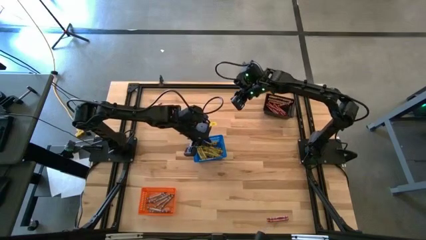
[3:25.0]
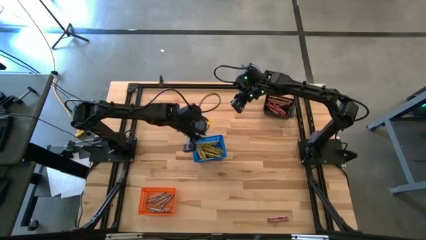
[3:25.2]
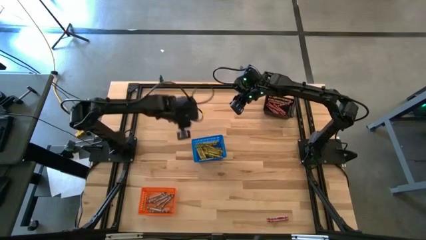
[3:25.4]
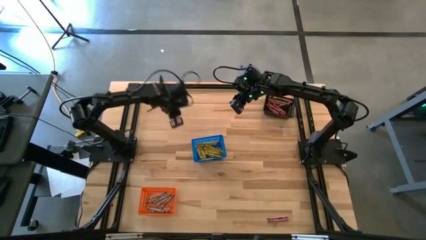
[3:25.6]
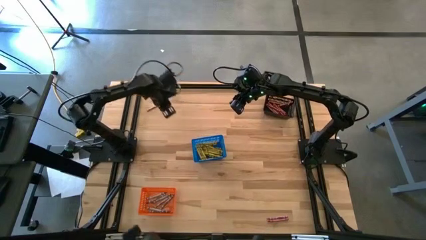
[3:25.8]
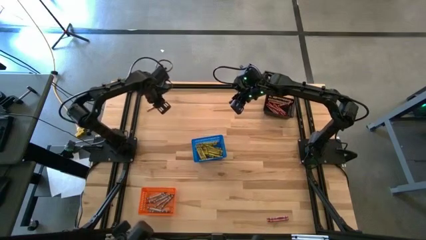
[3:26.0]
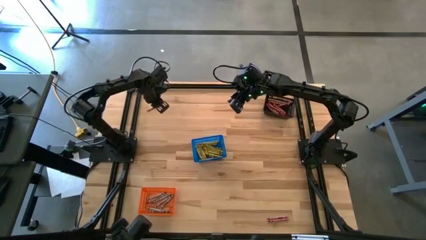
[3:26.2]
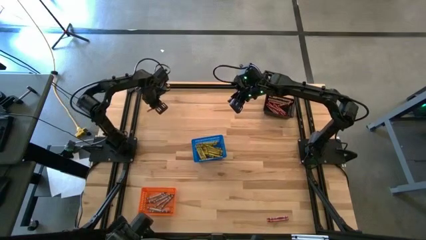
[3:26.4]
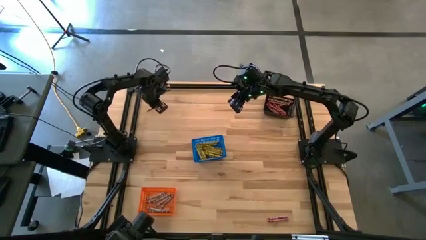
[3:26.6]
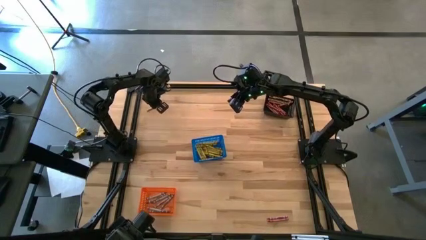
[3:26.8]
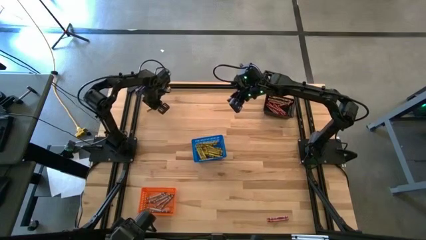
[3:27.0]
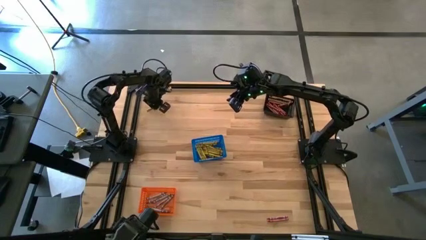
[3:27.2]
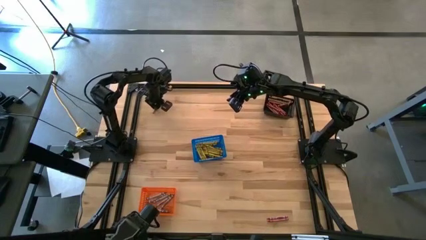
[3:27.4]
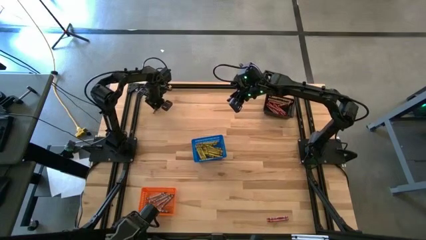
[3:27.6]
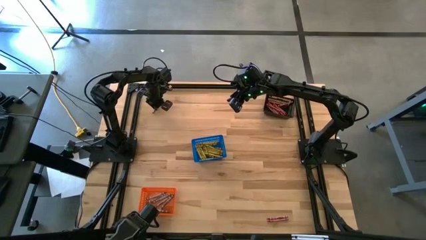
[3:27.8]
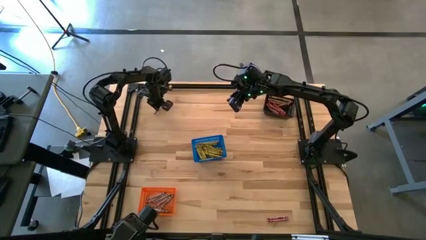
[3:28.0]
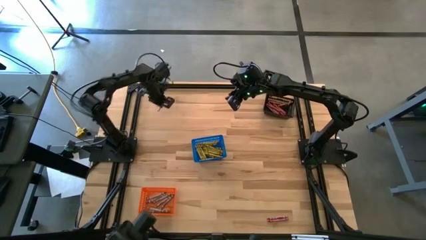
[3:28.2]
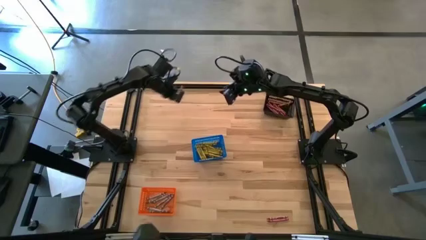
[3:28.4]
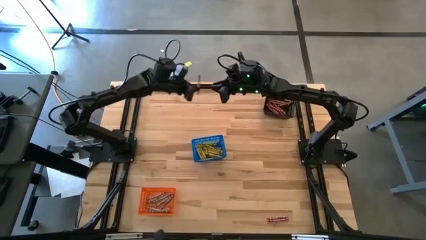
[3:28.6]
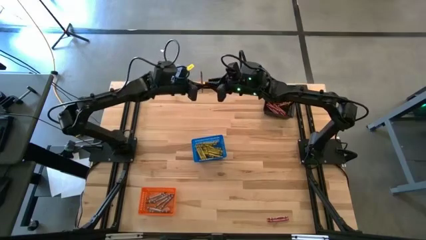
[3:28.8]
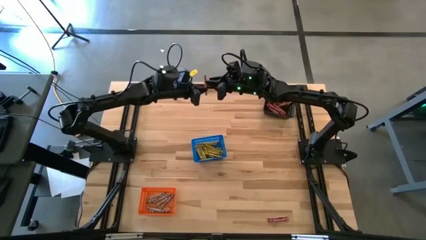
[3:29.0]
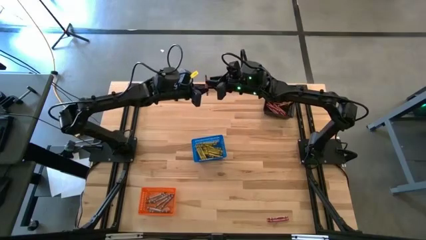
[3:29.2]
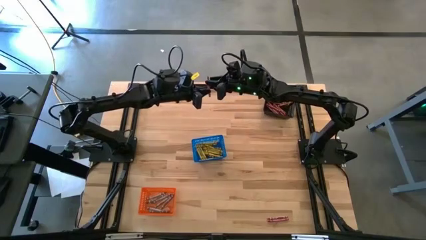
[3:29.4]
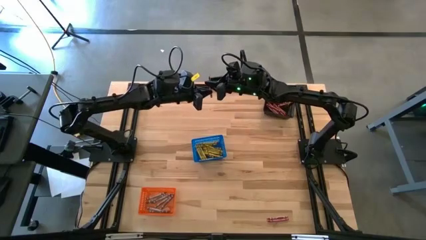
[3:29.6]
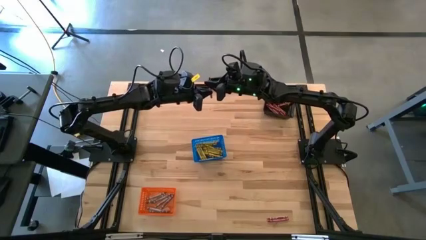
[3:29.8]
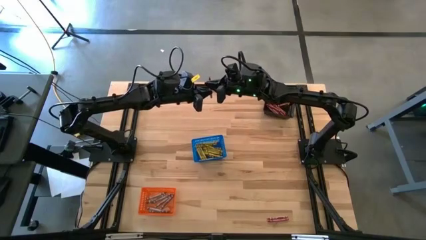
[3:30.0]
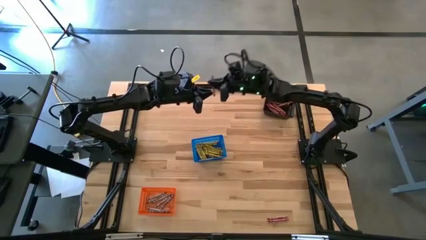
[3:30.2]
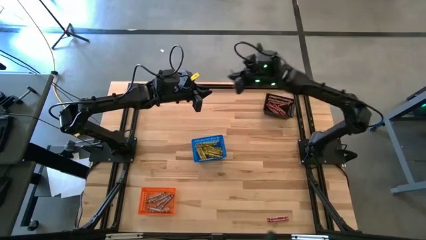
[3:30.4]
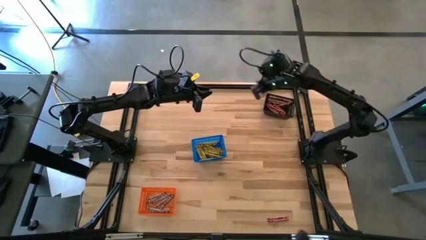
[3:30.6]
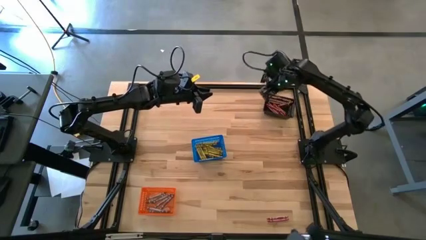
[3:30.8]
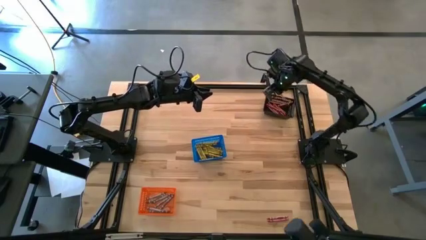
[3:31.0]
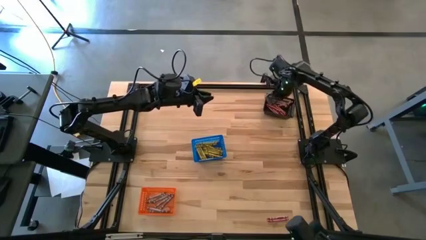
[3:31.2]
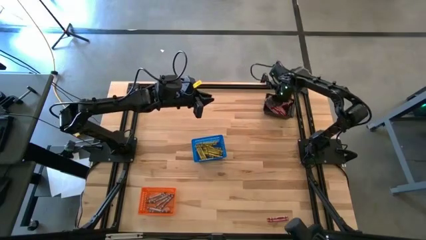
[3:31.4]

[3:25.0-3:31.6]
Task: Sort crayons
Put the red crayon into the black basket

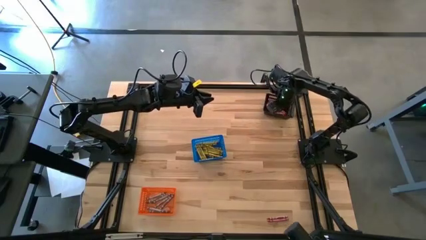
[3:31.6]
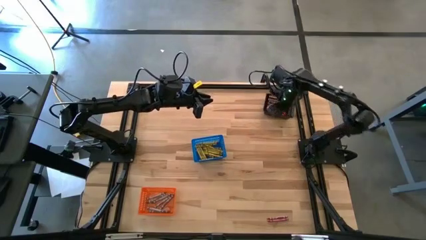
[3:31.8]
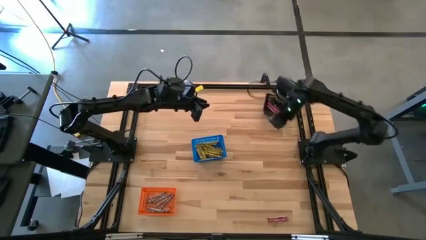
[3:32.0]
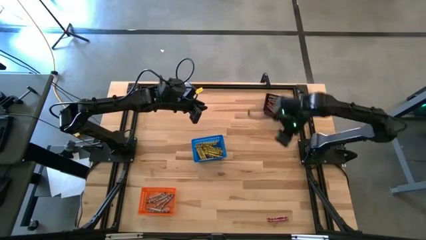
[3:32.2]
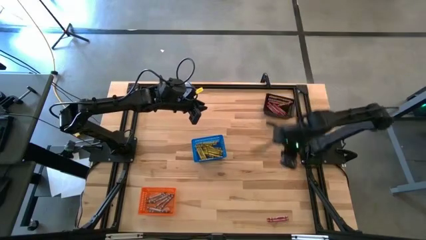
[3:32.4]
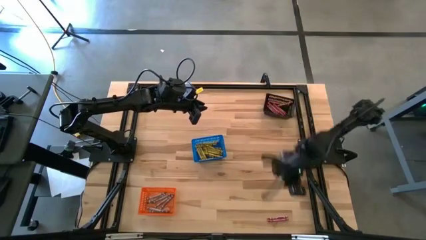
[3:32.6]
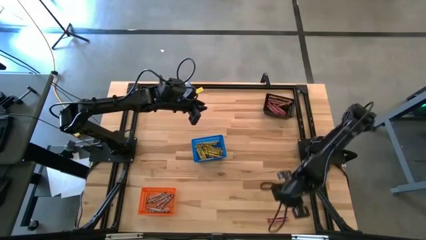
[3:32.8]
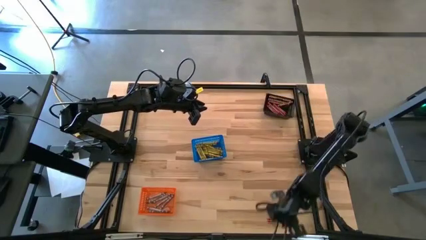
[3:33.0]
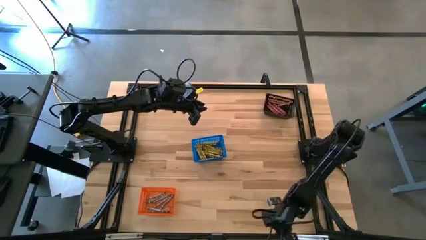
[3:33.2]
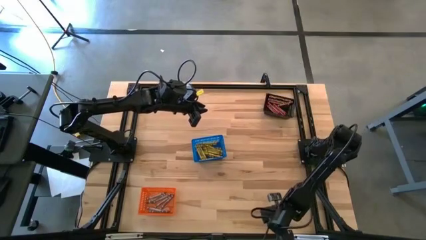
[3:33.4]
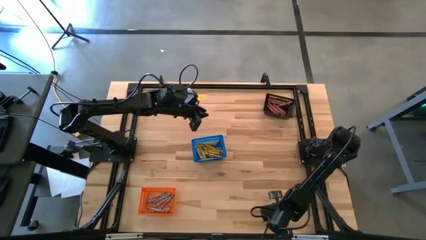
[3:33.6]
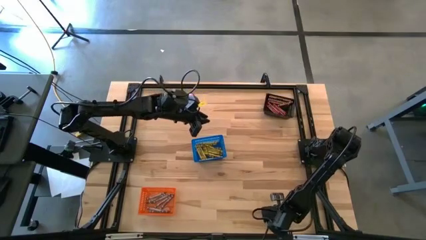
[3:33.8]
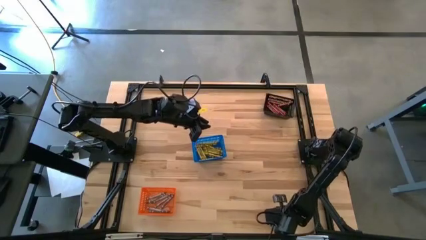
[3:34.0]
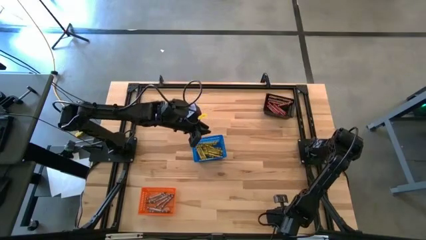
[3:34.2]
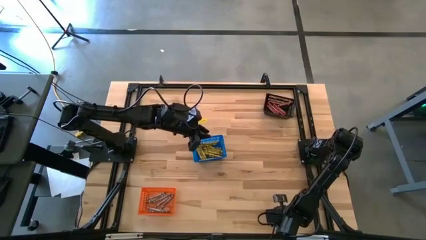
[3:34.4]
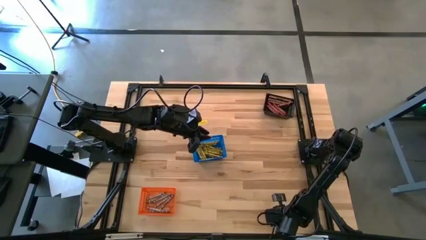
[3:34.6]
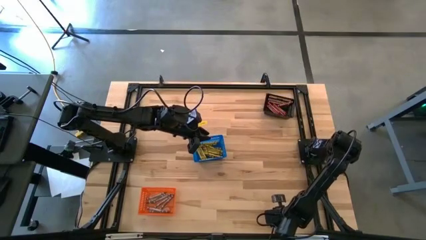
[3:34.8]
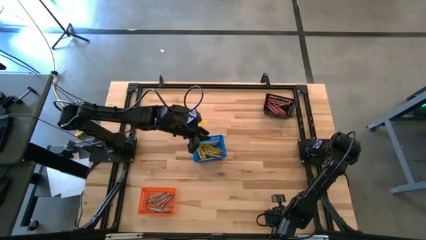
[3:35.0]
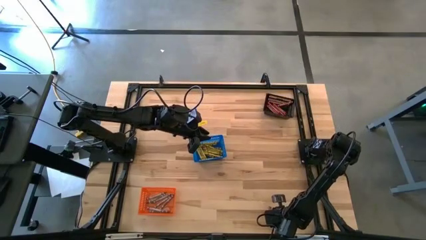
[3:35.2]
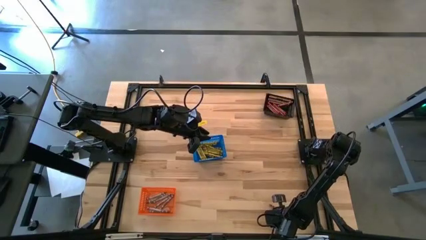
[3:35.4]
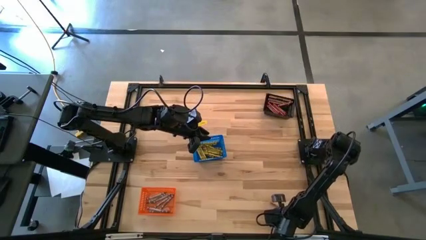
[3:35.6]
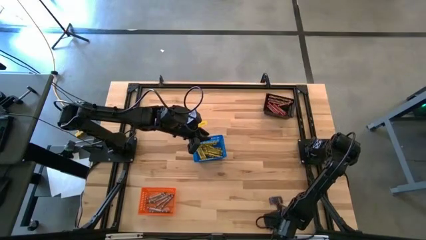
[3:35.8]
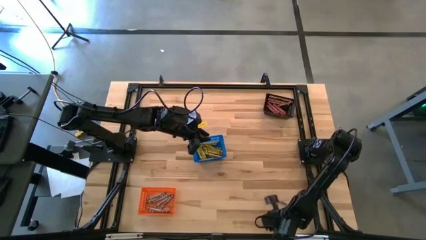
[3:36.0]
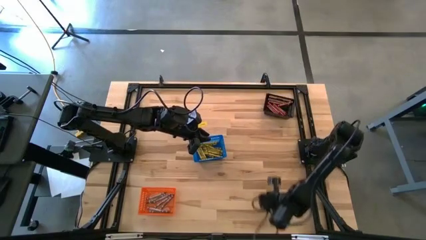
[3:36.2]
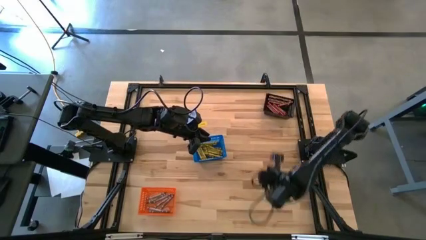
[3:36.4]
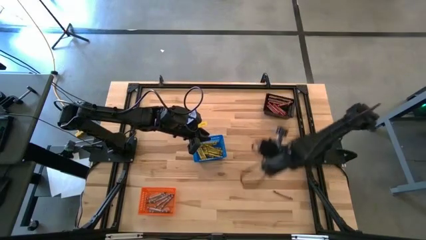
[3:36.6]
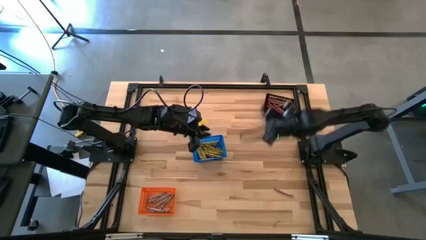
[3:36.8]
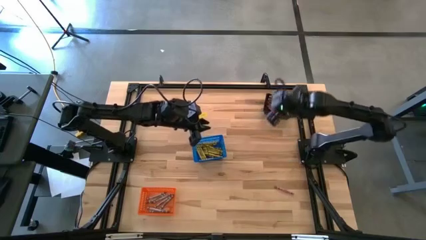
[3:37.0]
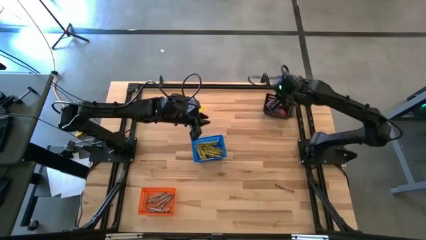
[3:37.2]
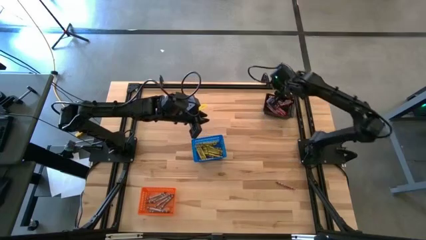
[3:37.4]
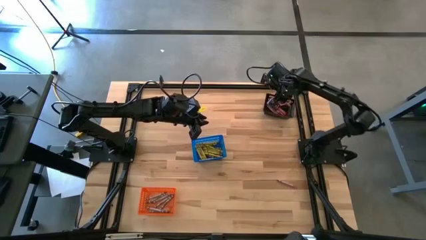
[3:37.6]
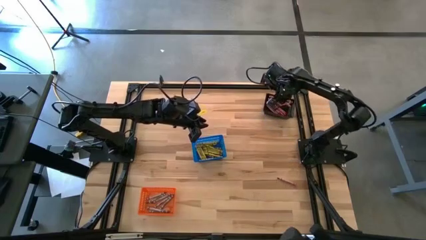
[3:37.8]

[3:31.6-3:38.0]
Put the red crayon into the black basket

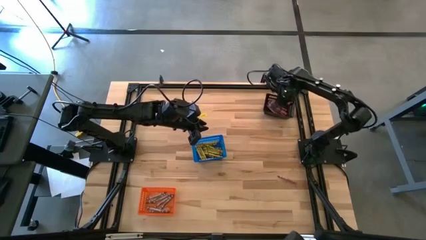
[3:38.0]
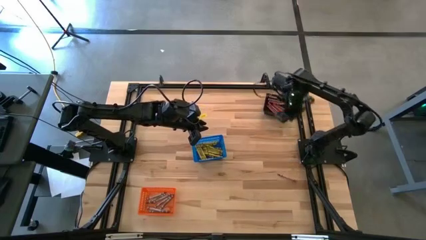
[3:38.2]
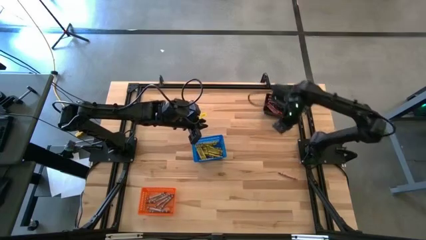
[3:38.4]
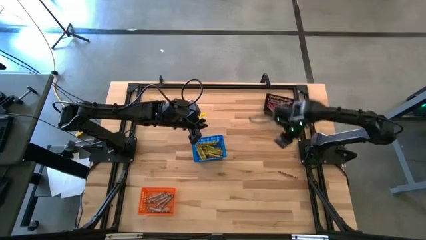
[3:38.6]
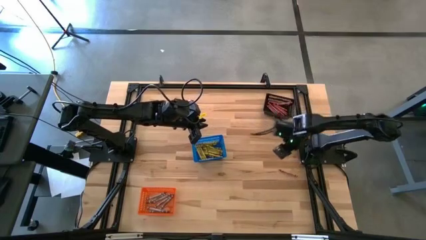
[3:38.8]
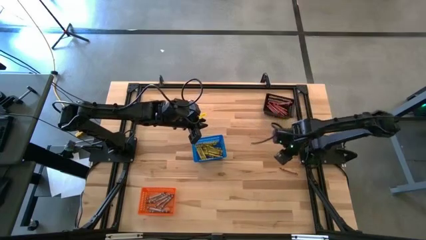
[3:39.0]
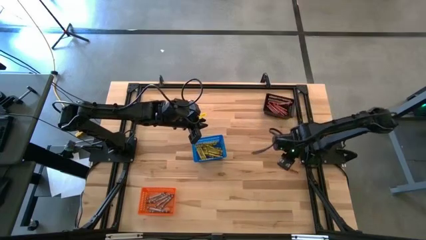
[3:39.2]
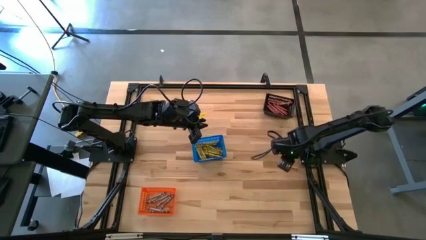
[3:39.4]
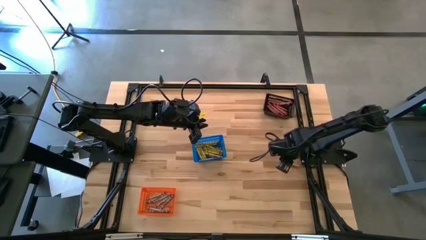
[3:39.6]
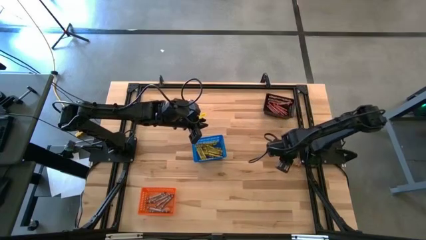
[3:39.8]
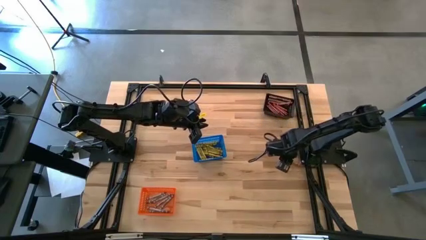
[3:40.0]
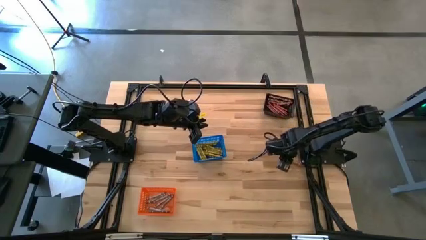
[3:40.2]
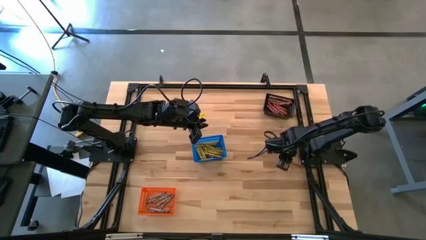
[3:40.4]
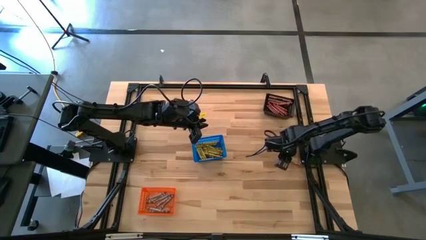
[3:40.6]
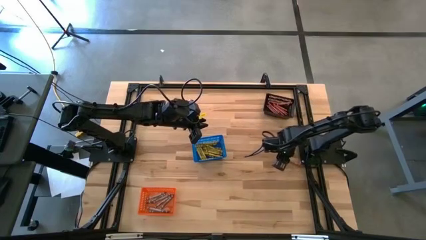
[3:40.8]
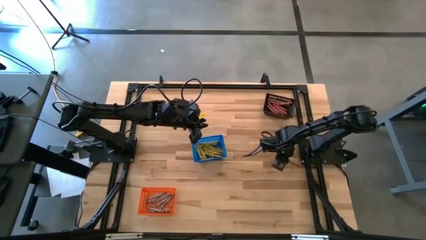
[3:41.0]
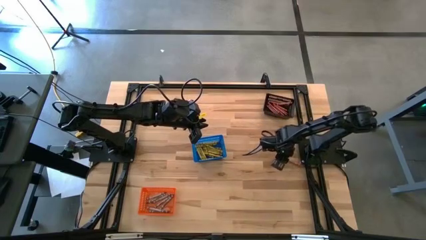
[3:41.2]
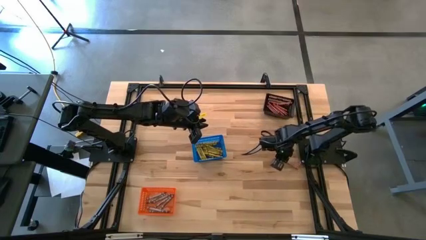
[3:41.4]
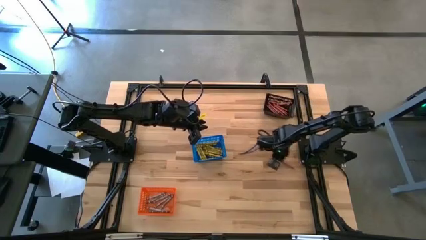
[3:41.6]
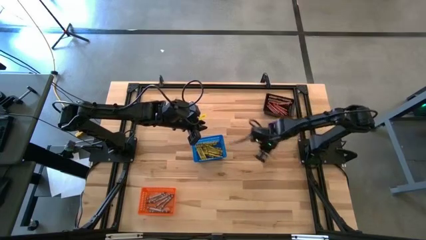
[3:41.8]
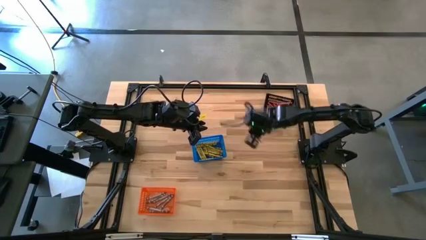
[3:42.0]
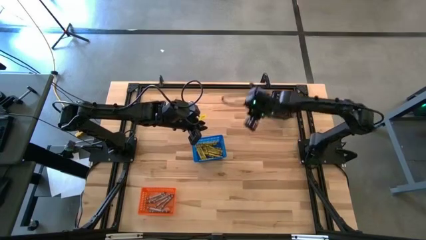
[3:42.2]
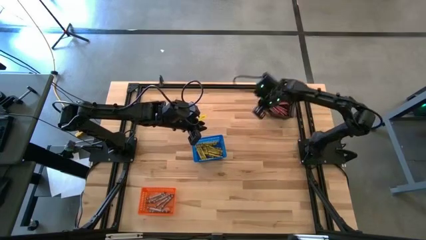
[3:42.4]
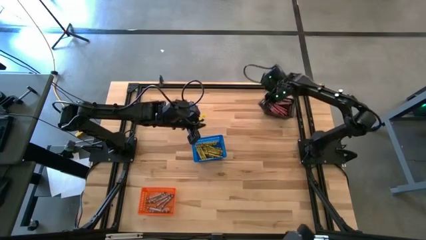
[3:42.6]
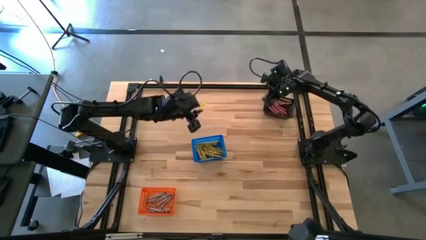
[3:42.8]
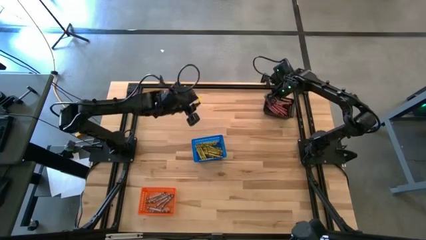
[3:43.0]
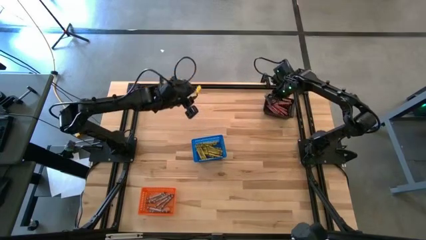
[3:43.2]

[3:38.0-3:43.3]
Put the red crayon into the black basket
